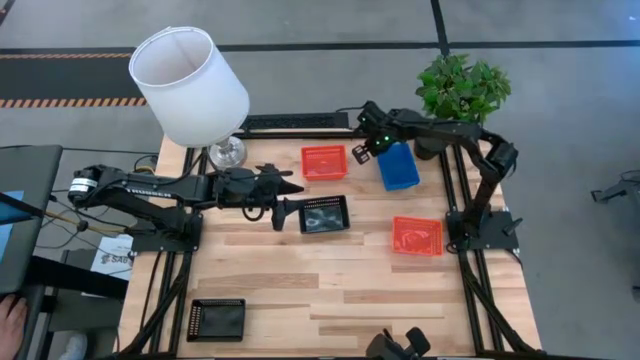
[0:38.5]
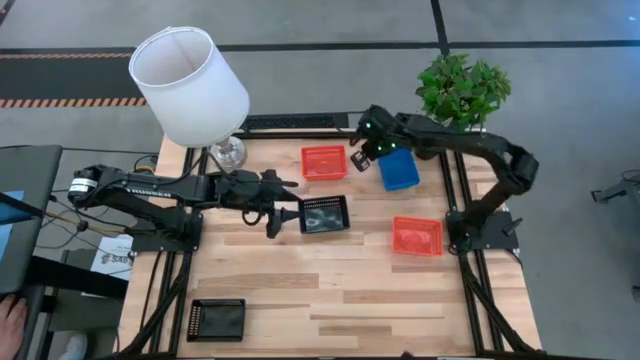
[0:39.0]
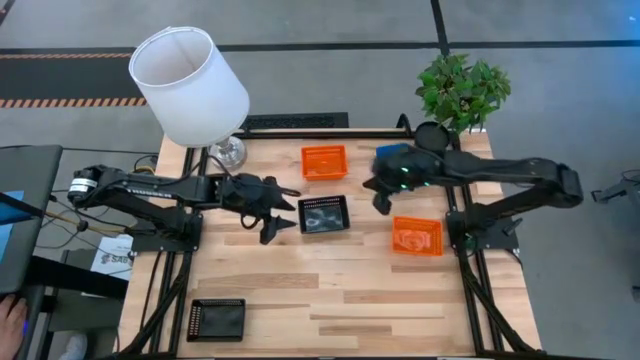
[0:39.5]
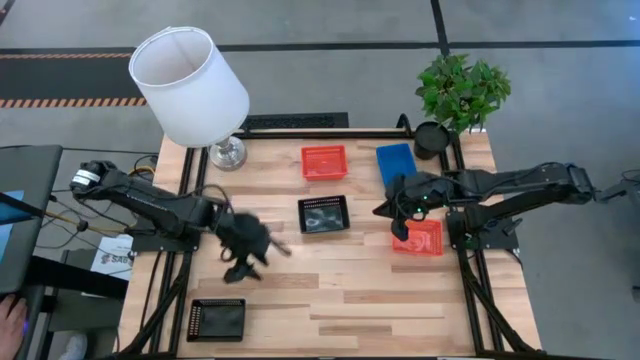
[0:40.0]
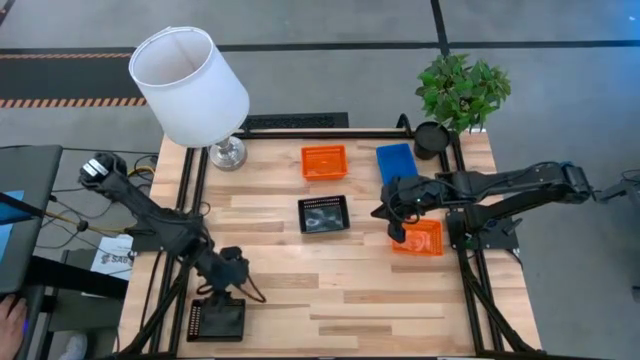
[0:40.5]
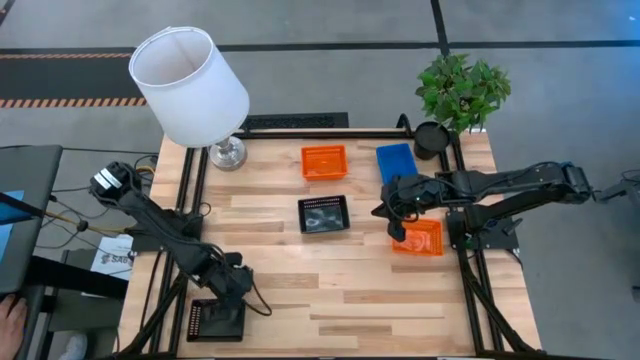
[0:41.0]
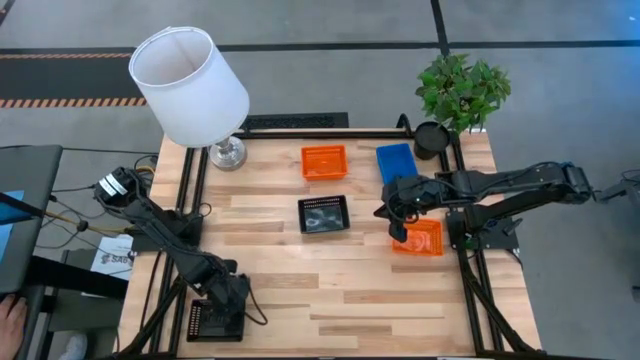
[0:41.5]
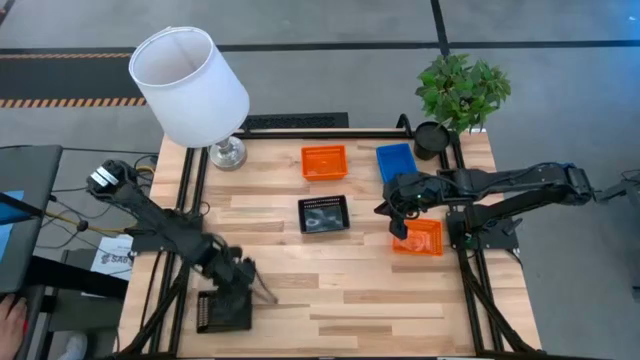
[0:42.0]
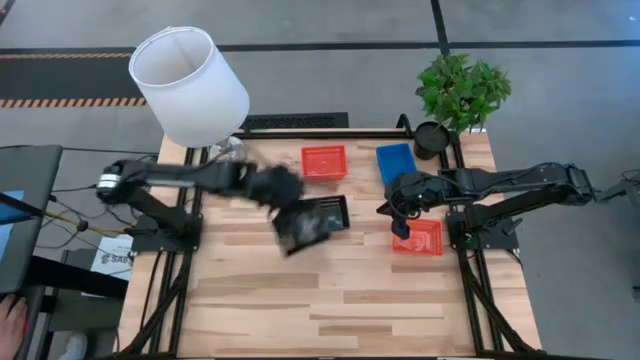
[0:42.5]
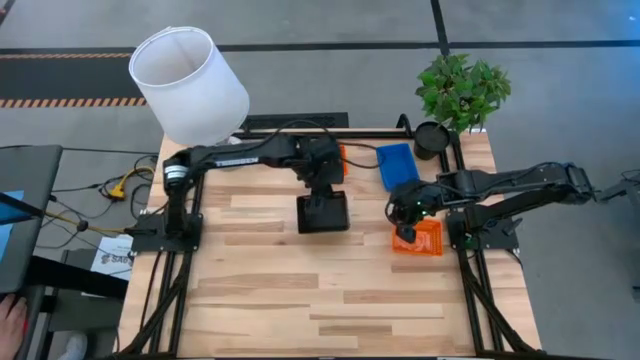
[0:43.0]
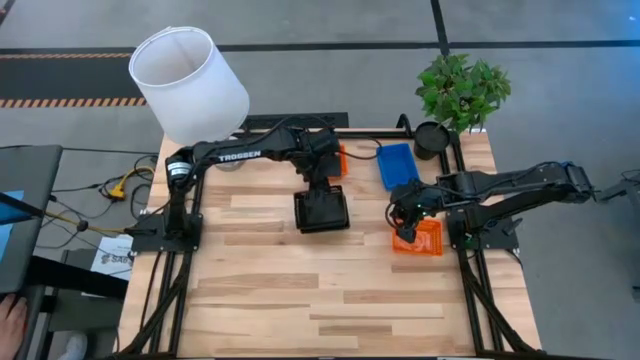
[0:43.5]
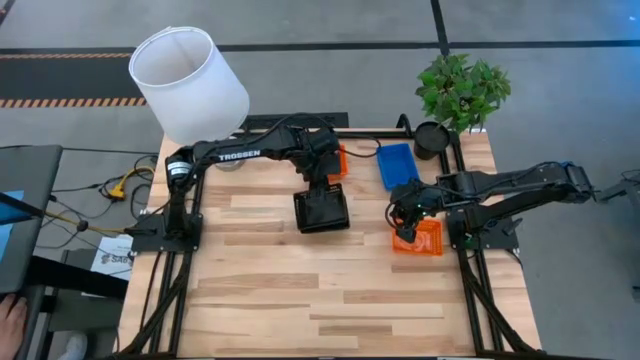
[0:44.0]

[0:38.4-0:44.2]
Stack the black bin on the top right black bin

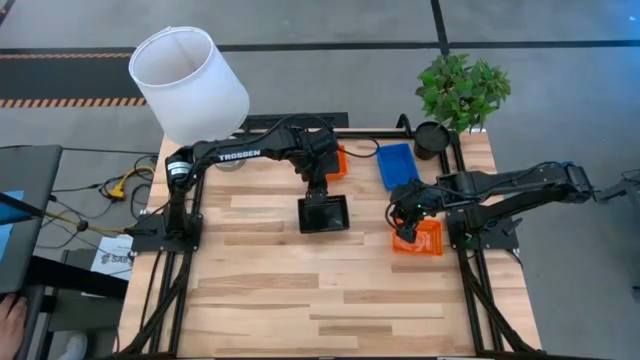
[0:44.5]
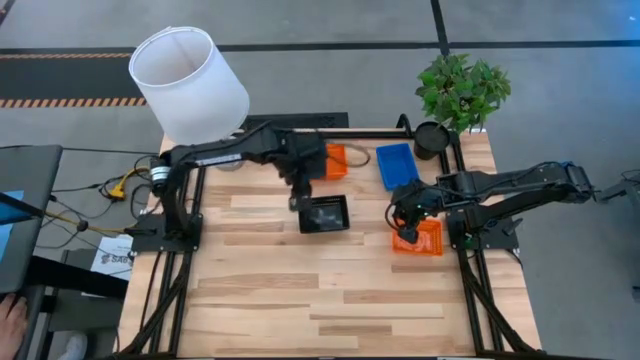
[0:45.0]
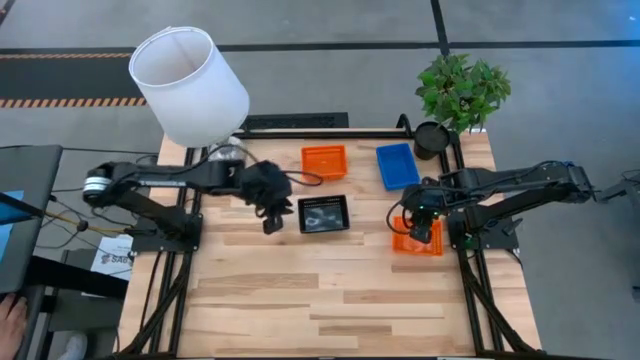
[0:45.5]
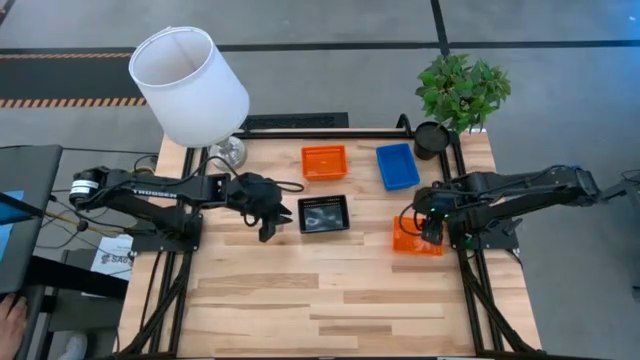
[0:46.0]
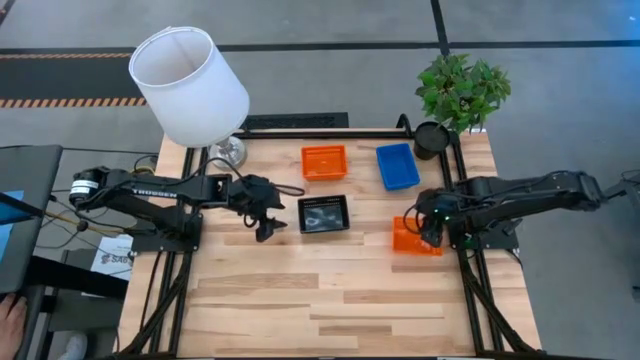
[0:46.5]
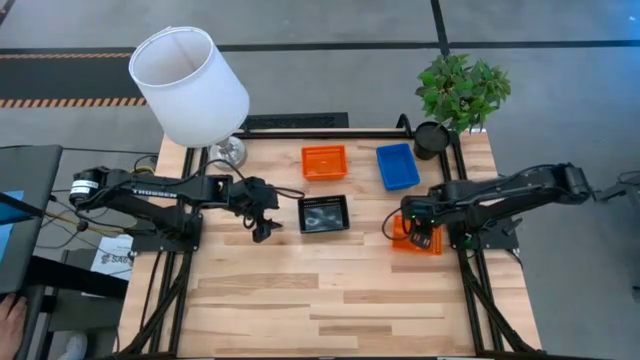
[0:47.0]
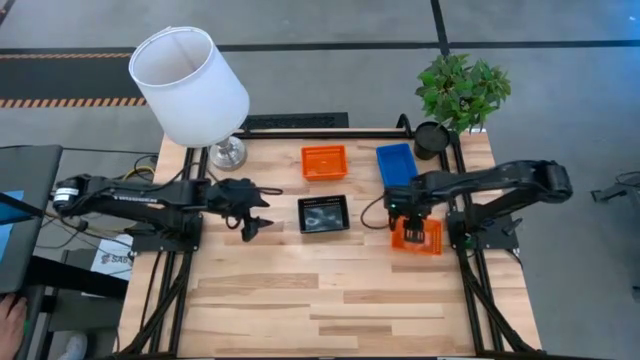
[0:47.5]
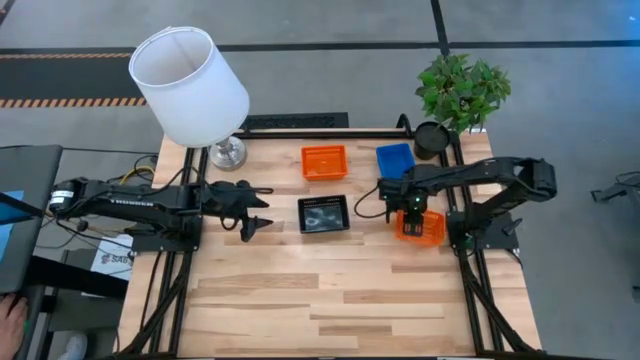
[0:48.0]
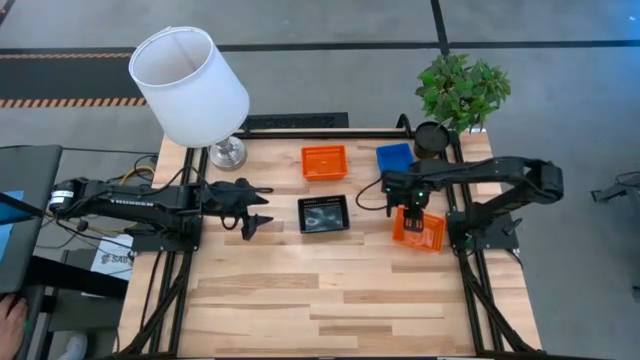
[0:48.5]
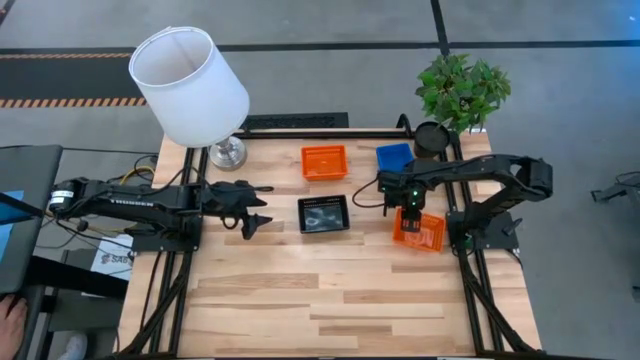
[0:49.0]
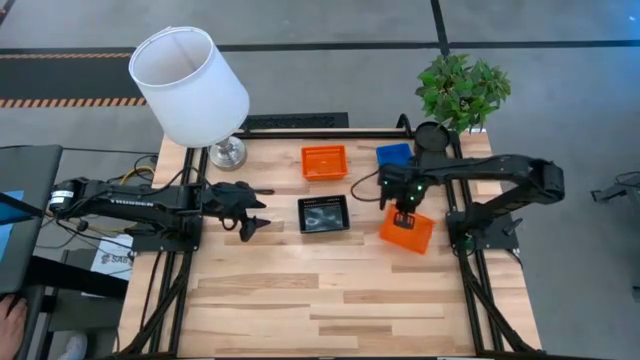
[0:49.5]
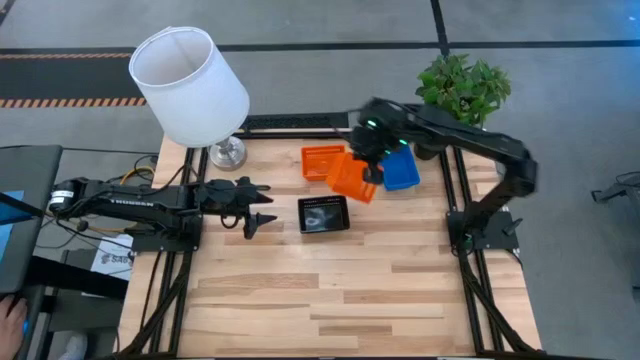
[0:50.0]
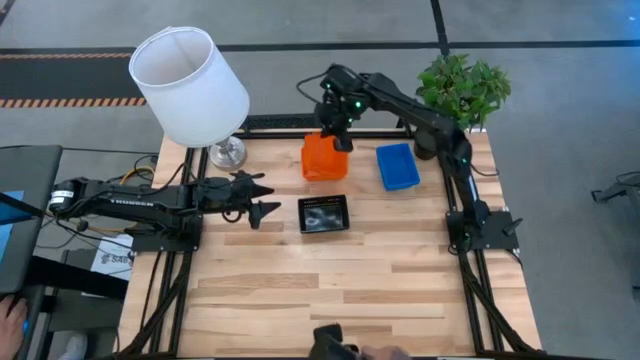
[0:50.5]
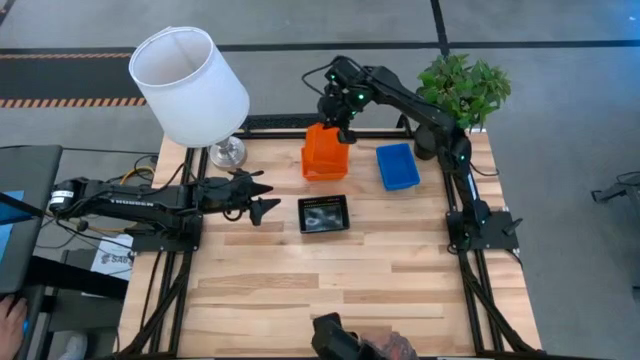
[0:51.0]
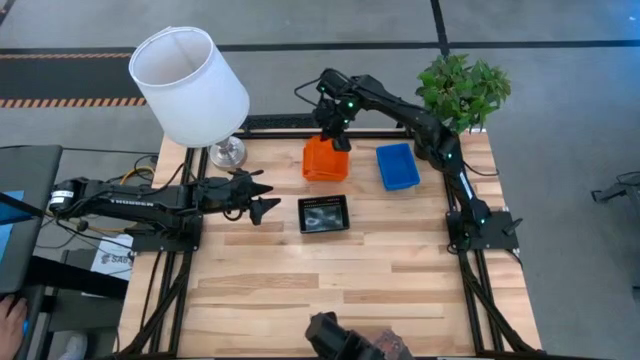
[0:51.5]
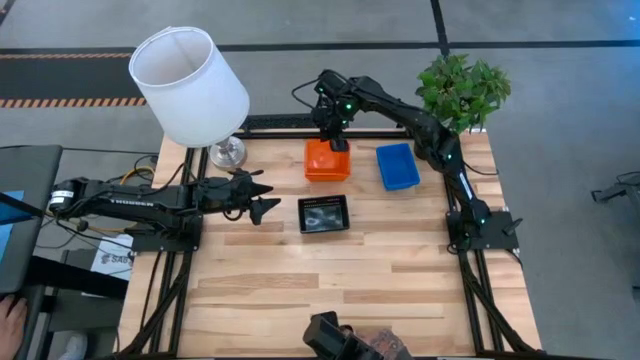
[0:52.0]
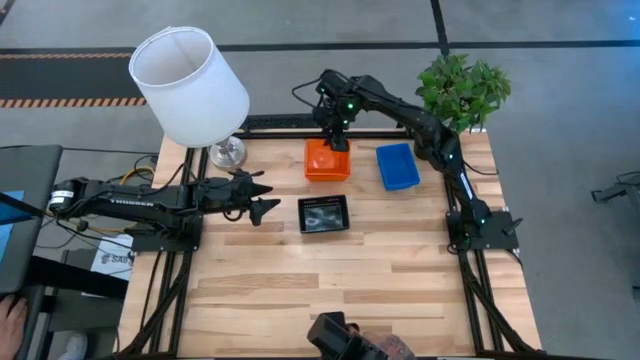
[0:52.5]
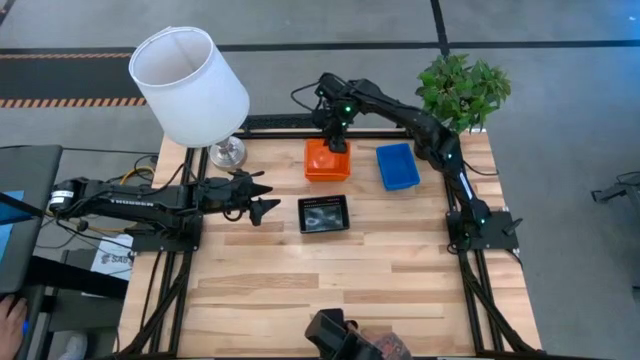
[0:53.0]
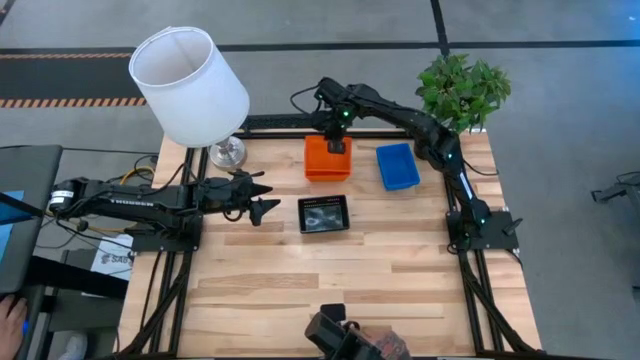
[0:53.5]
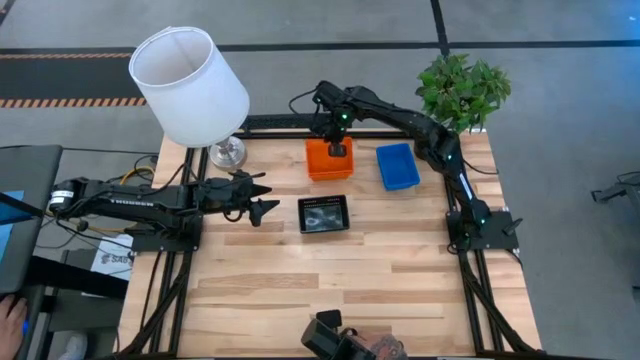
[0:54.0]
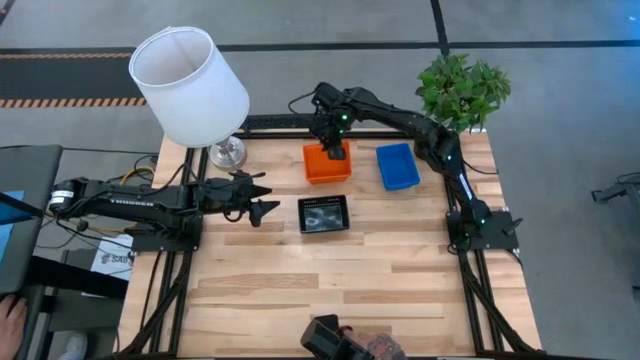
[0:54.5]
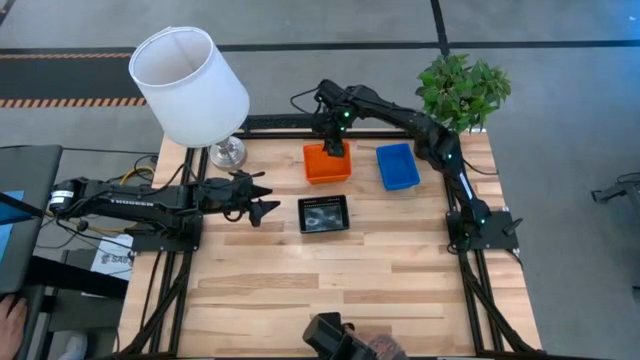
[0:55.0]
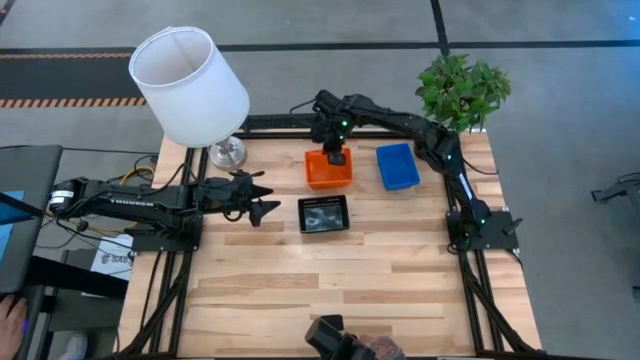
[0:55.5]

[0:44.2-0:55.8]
Stack the orange bin on the top orange bin
